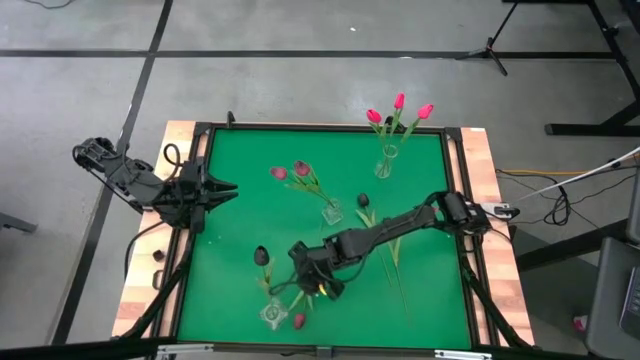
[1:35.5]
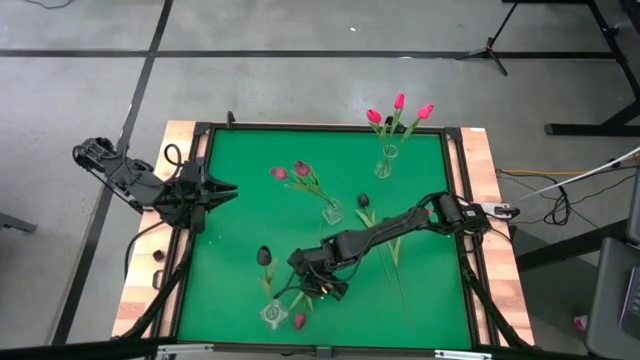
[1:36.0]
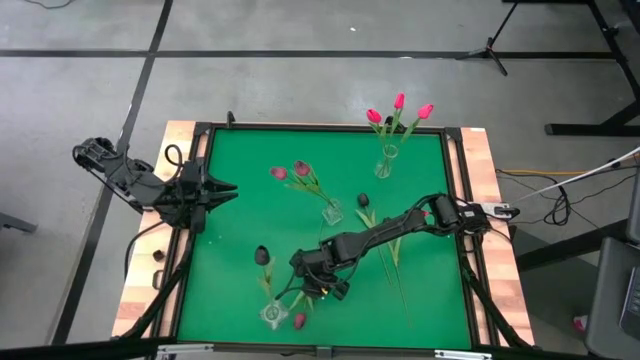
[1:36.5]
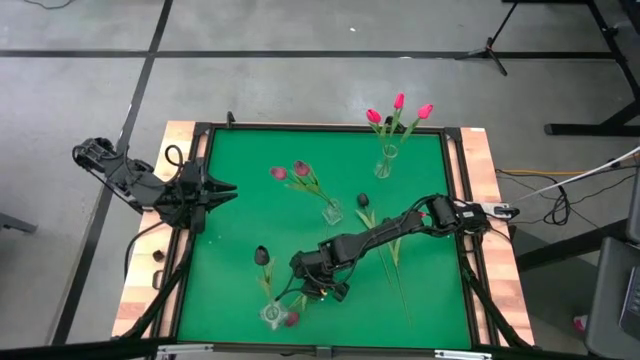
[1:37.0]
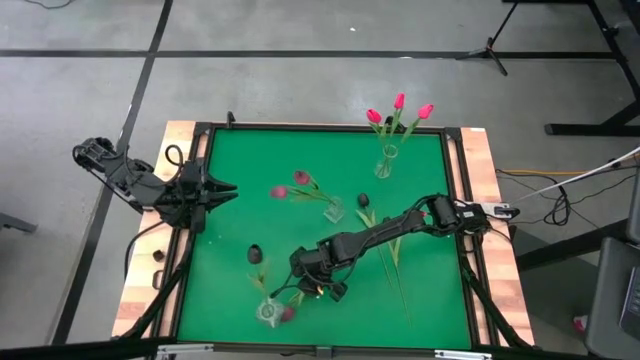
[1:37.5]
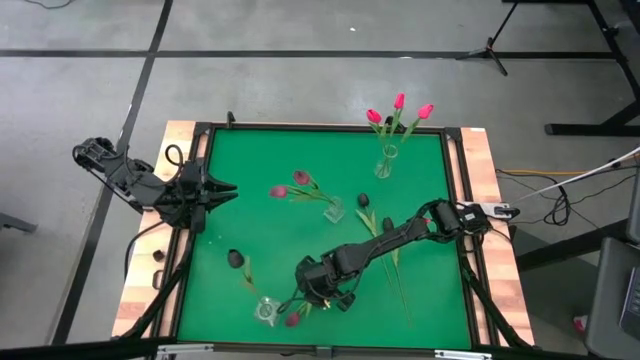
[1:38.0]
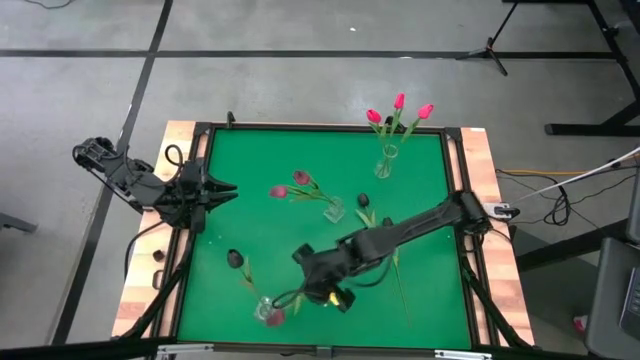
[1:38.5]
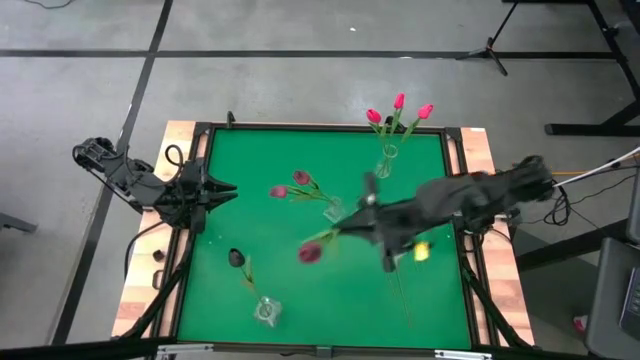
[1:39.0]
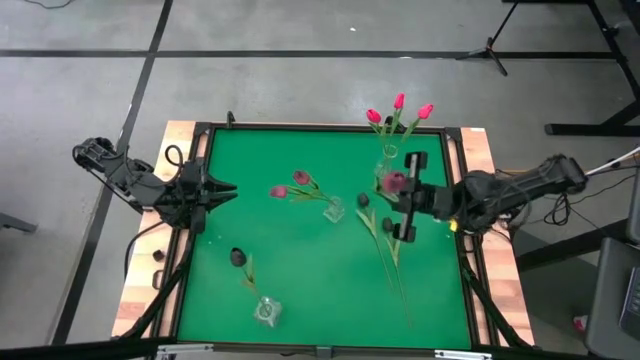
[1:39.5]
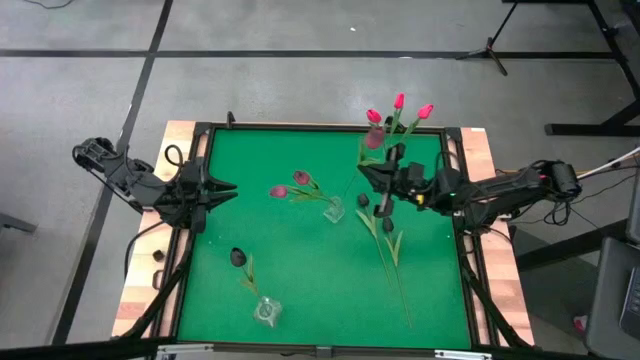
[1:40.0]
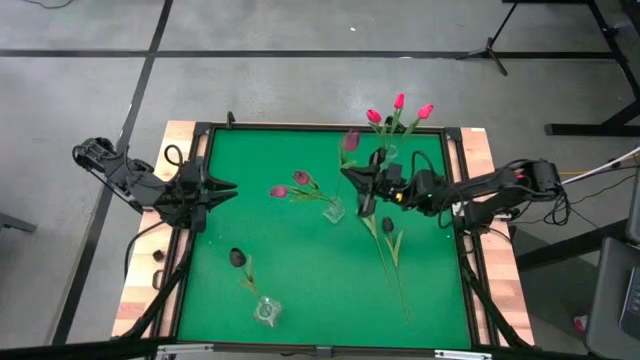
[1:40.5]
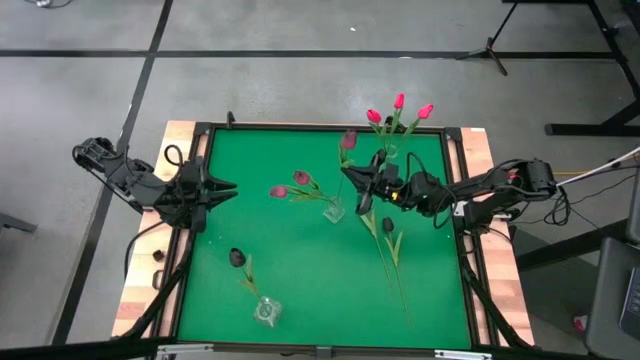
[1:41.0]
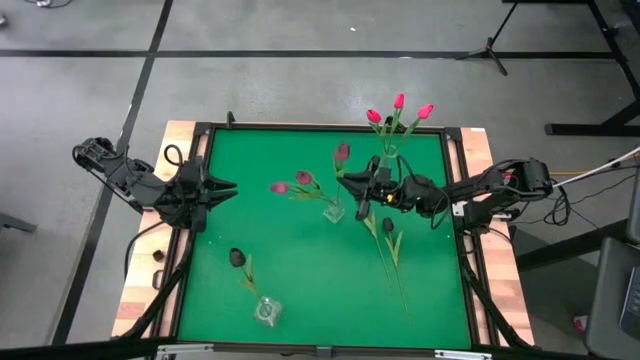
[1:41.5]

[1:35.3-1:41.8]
Task: Sort flowers into vase by color
Put the dark red tulip into the center transparent vase

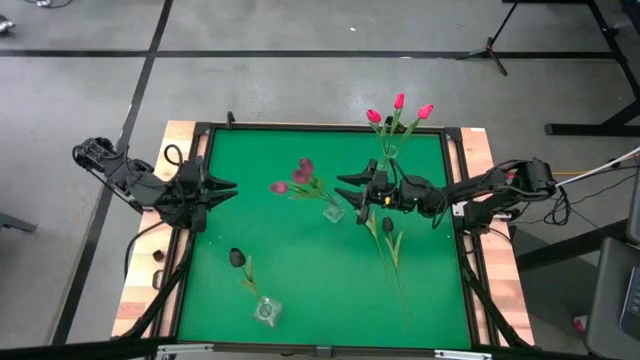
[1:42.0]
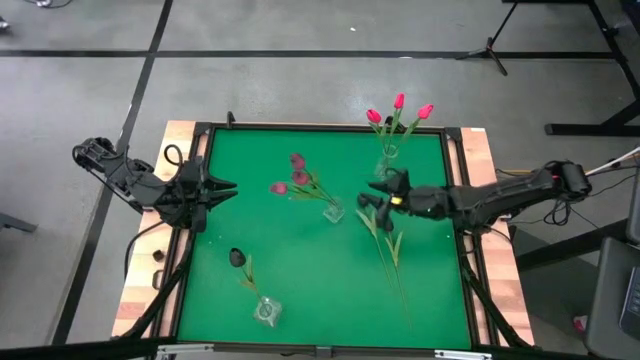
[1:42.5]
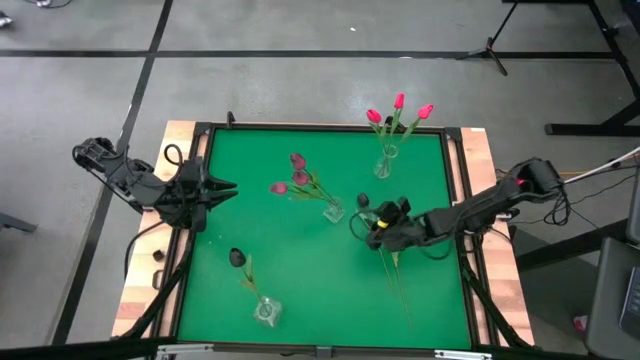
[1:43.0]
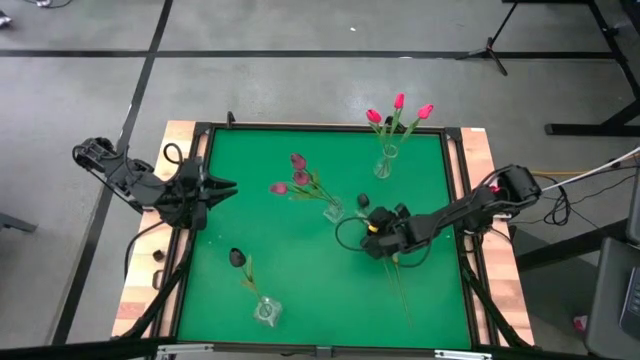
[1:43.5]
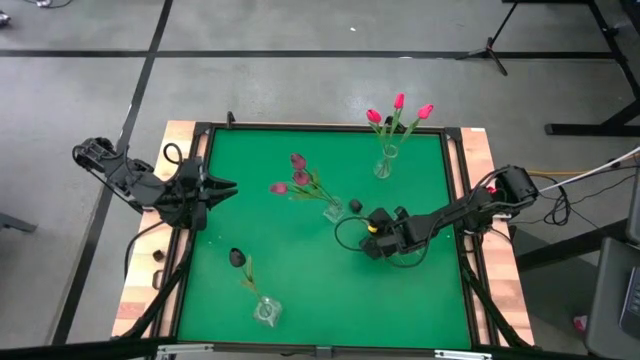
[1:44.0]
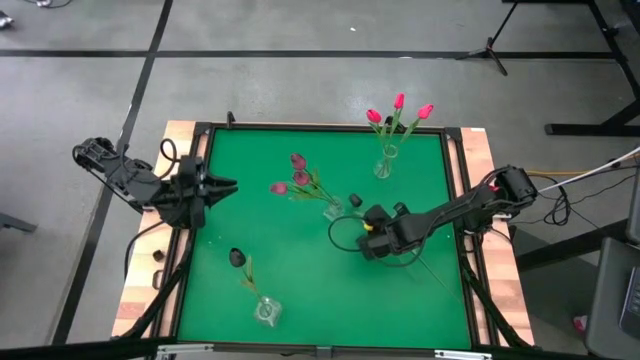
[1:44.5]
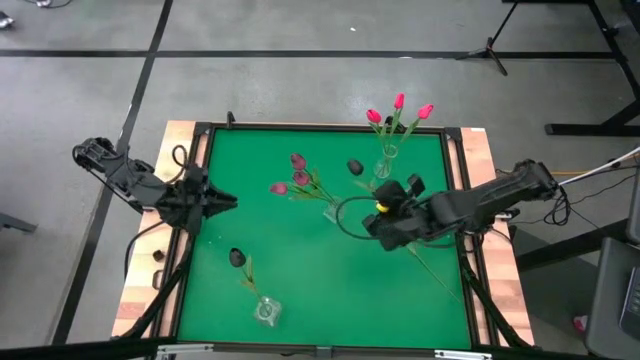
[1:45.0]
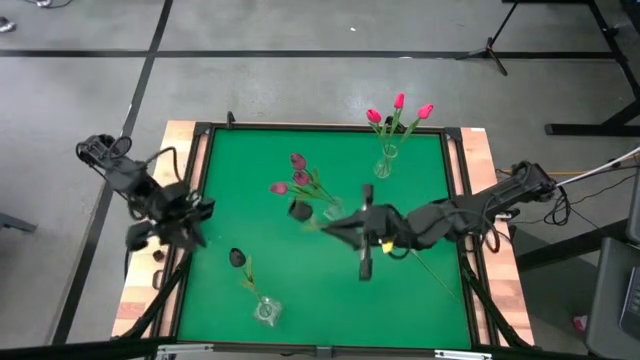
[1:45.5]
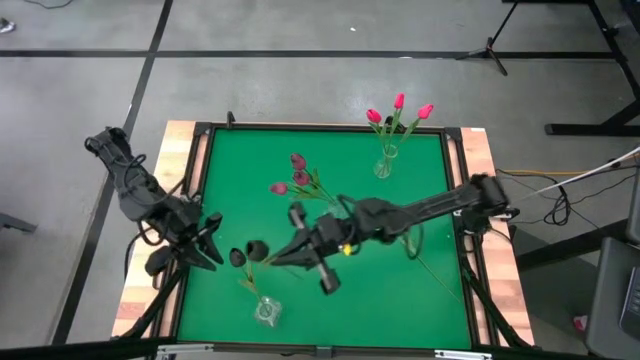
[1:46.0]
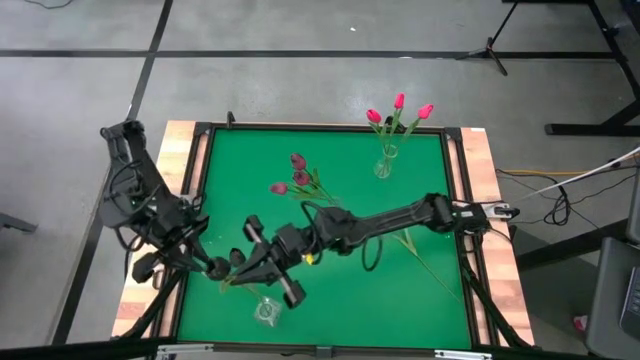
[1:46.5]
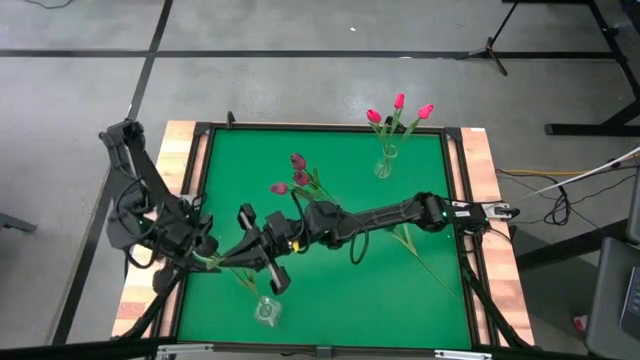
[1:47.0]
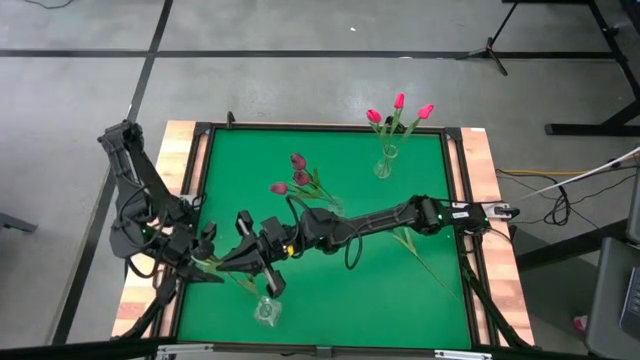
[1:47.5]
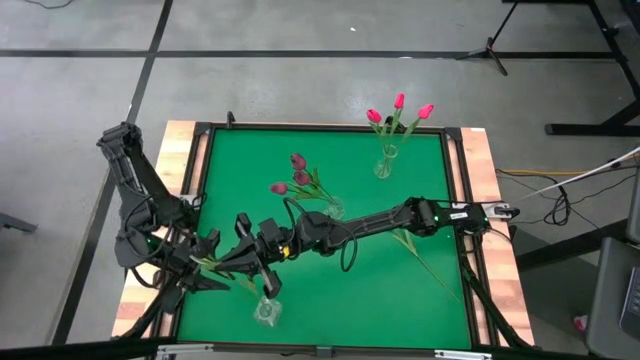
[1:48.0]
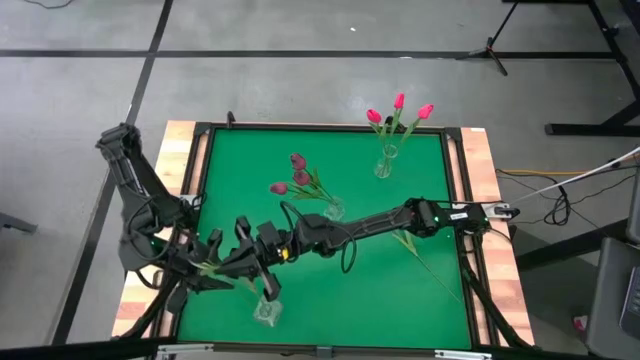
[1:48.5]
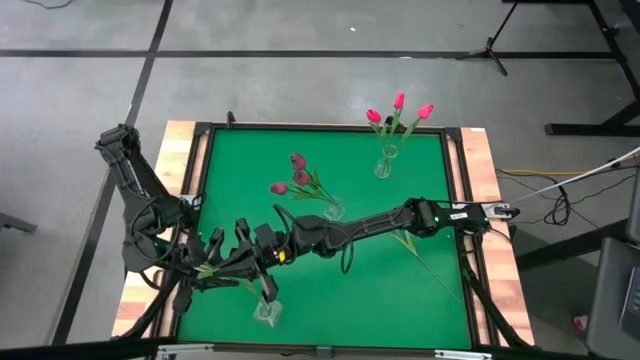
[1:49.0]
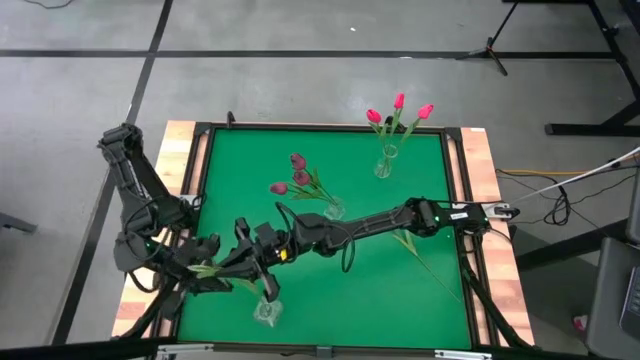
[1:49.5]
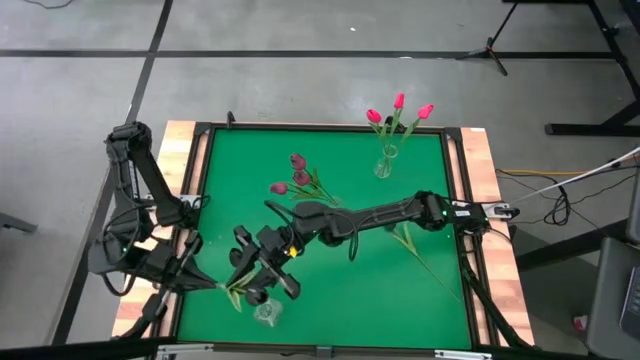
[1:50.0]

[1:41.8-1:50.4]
Put the left black tulip into the bottom transparent vase

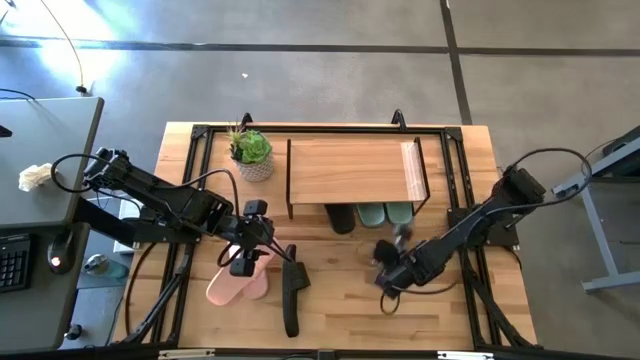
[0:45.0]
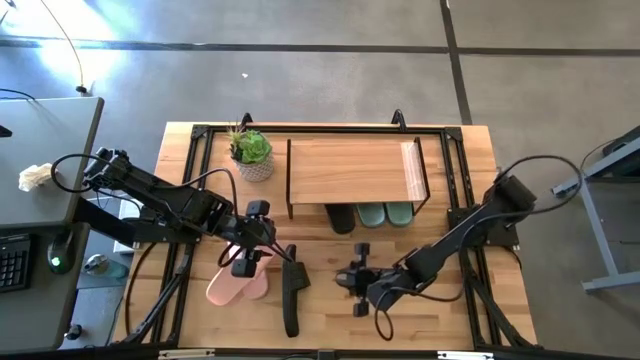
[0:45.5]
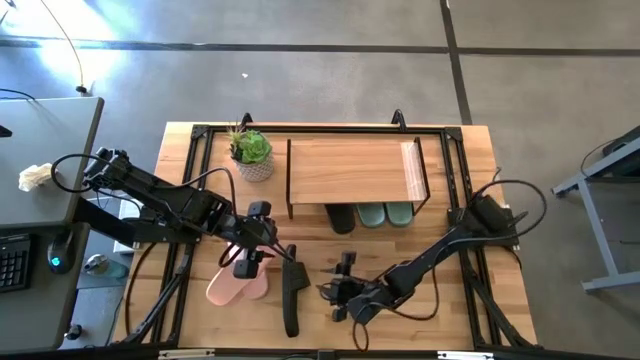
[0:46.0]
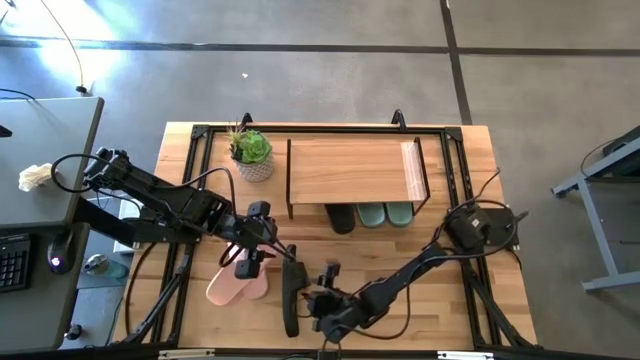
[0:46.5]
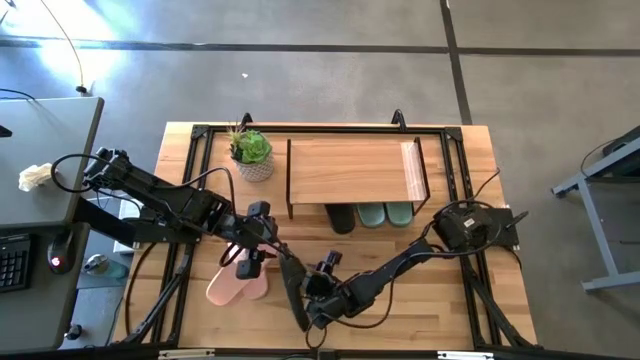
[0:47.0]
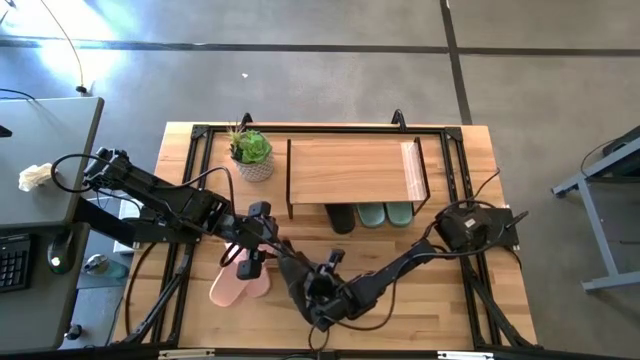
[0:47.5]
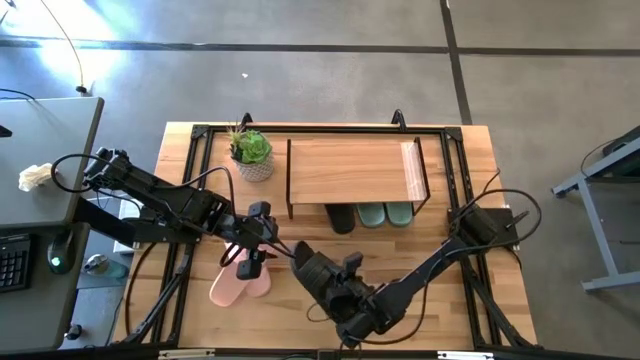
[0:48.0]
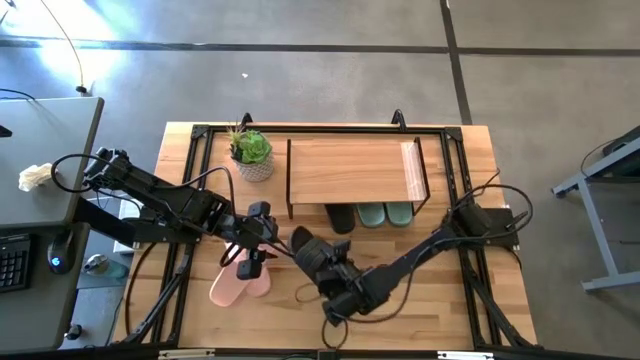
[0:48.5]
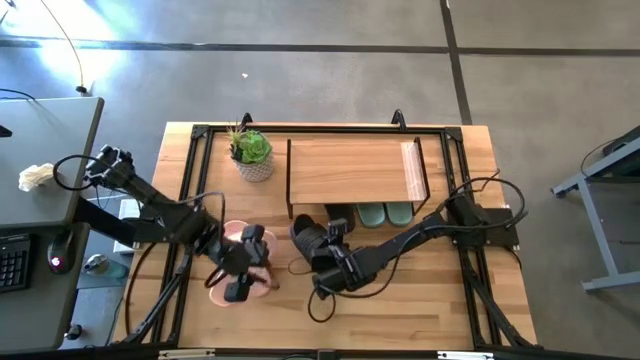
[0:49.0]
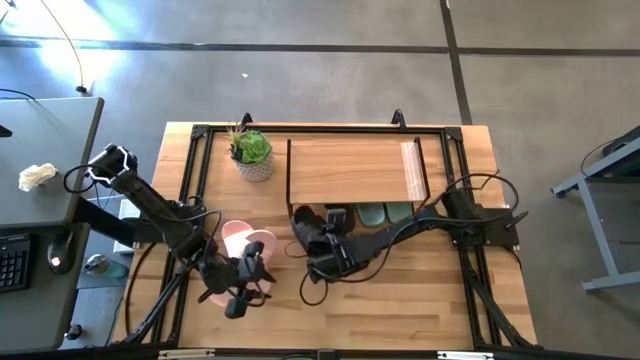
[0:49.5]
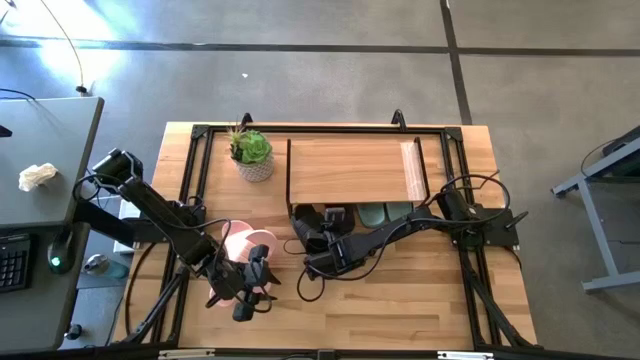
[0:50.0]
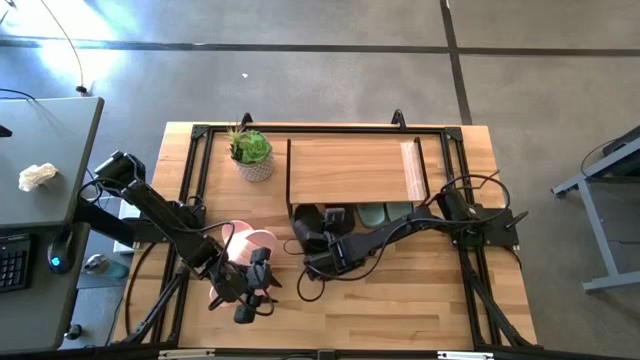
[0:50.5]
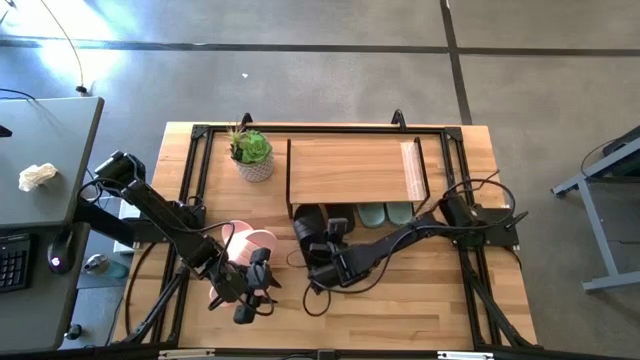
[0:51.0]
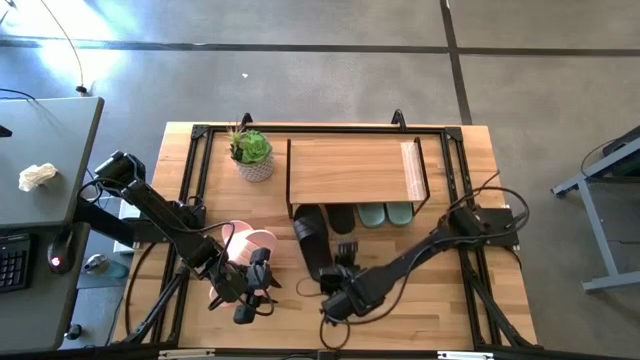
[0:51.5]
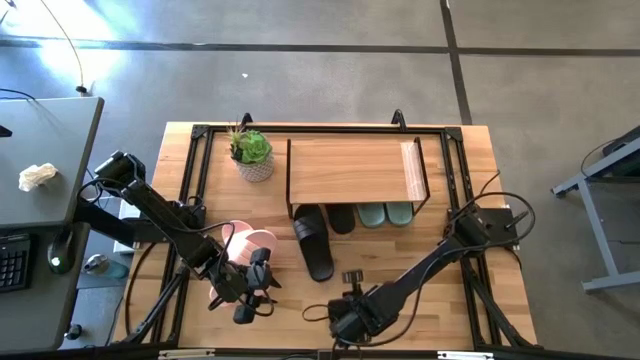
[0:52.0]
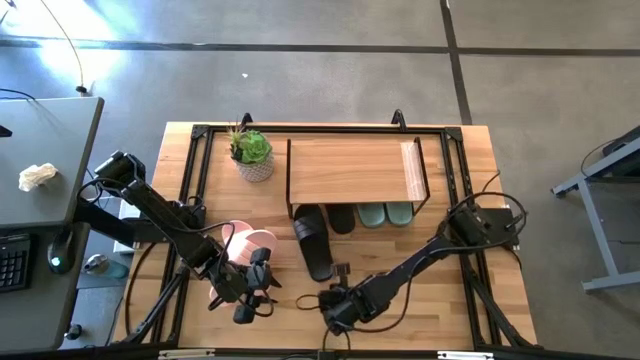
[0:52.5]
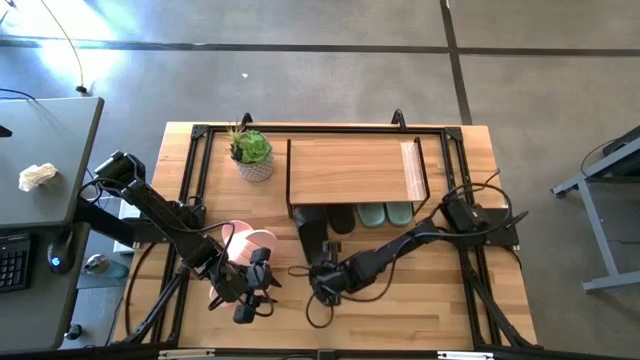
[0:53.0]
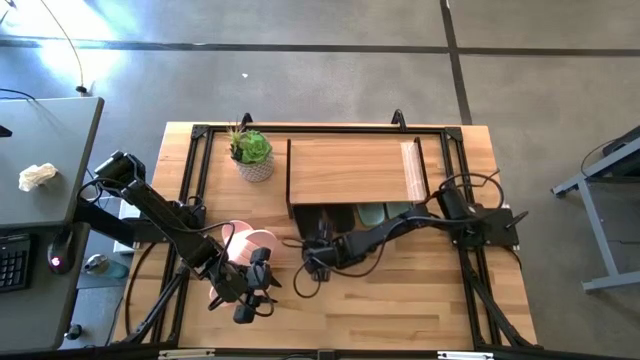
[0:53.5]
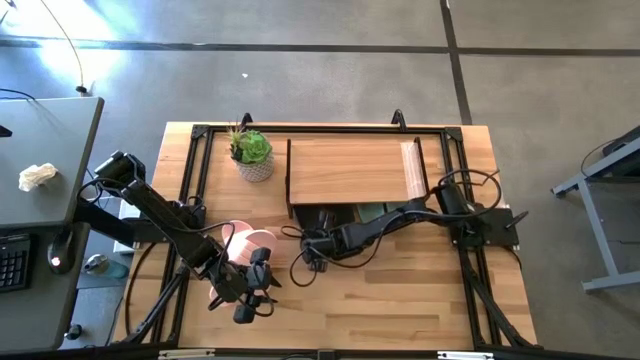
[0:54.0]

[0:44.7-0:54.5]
Task: Pick and place slides into the shelf
Put the black slipper under the shelf
